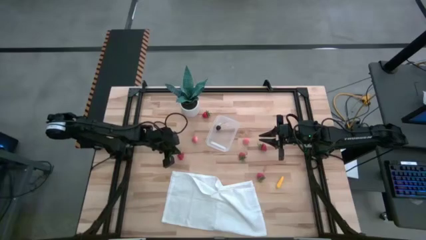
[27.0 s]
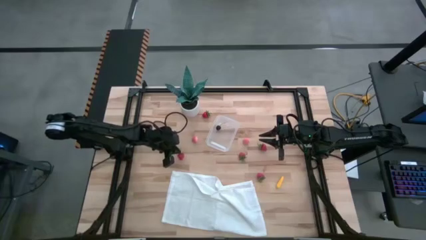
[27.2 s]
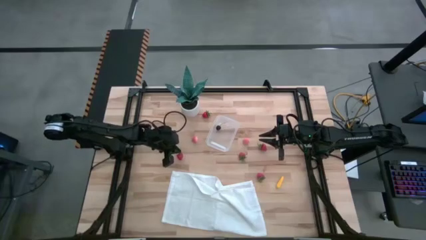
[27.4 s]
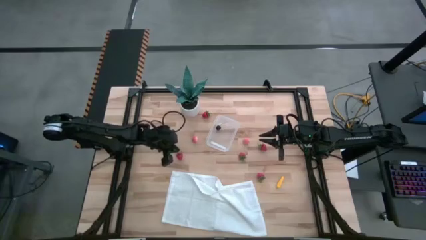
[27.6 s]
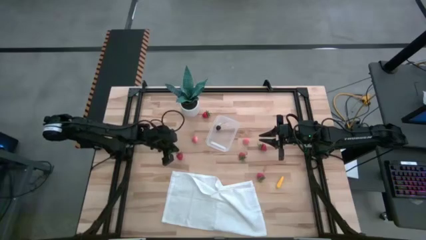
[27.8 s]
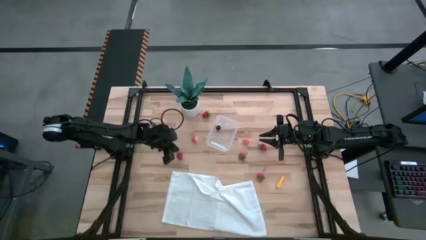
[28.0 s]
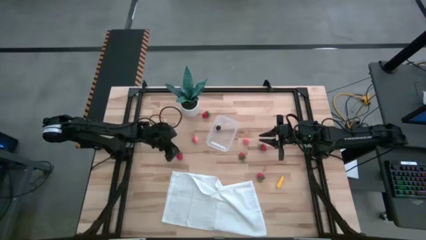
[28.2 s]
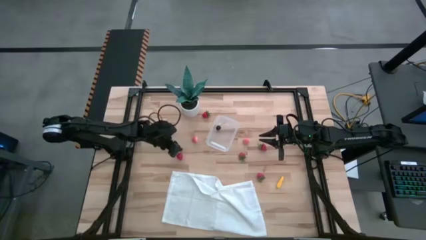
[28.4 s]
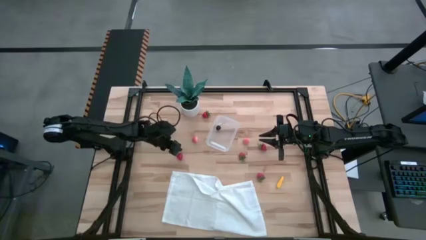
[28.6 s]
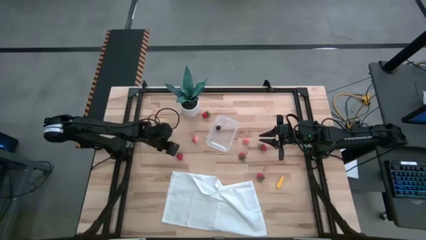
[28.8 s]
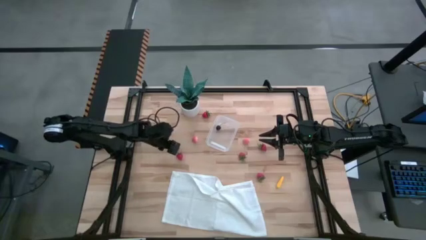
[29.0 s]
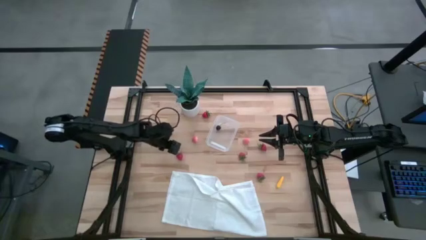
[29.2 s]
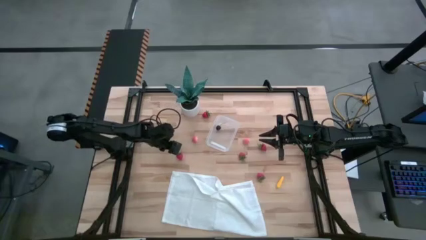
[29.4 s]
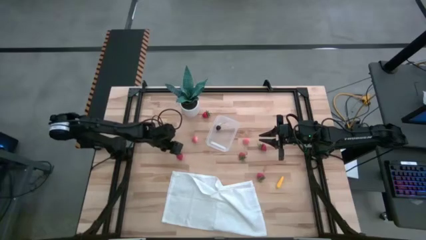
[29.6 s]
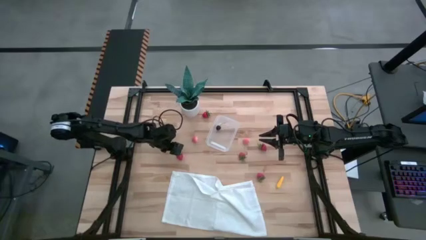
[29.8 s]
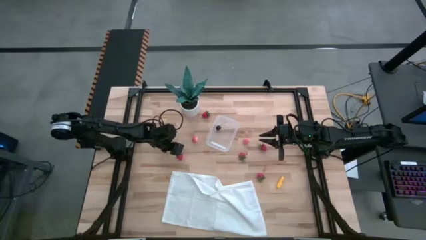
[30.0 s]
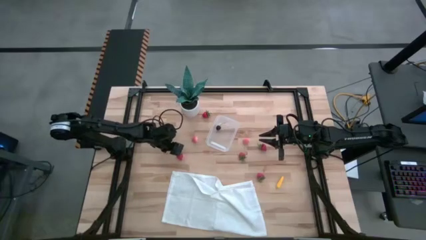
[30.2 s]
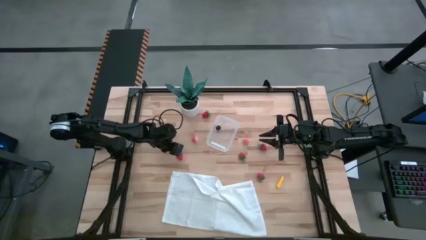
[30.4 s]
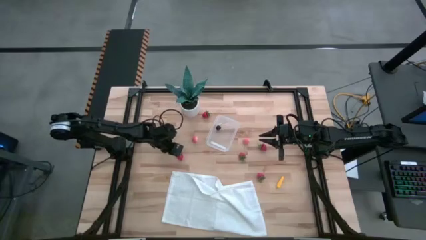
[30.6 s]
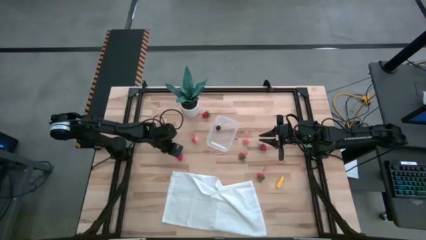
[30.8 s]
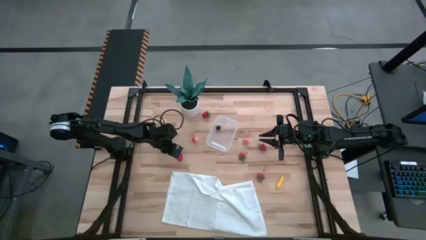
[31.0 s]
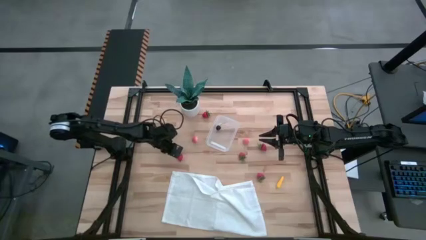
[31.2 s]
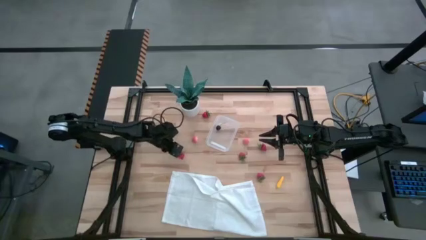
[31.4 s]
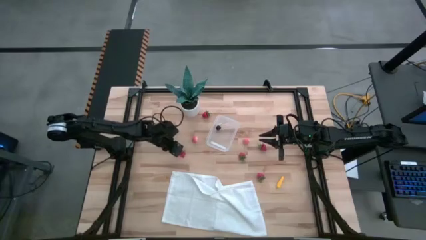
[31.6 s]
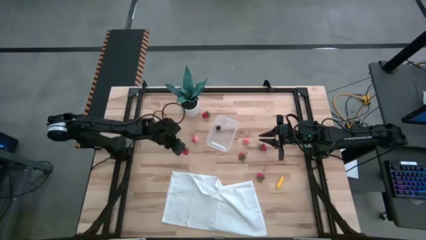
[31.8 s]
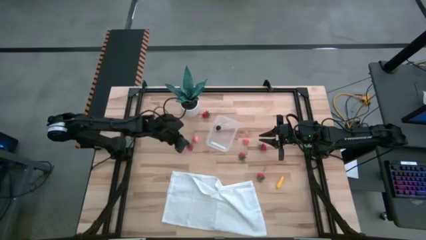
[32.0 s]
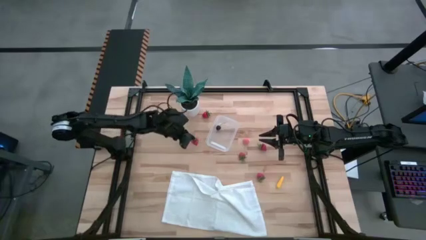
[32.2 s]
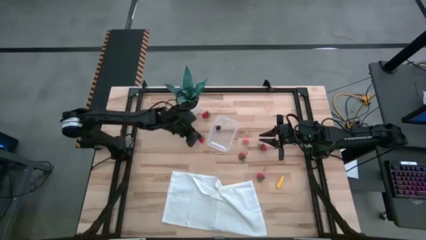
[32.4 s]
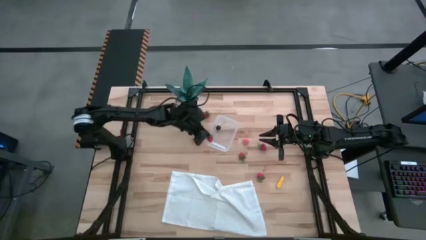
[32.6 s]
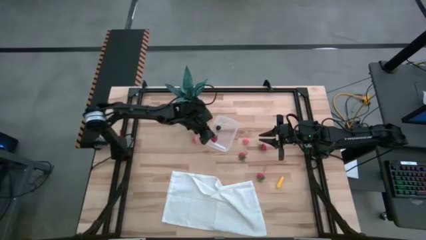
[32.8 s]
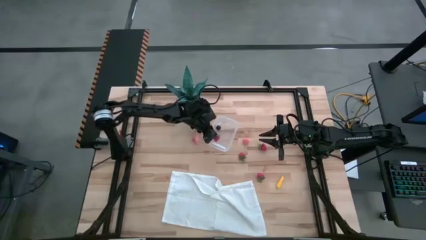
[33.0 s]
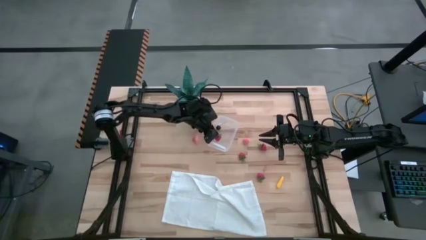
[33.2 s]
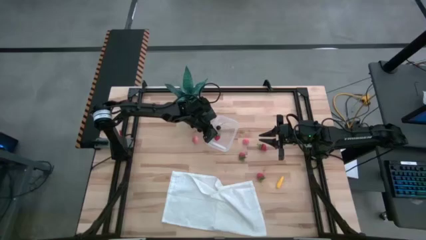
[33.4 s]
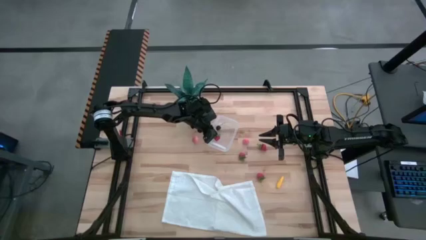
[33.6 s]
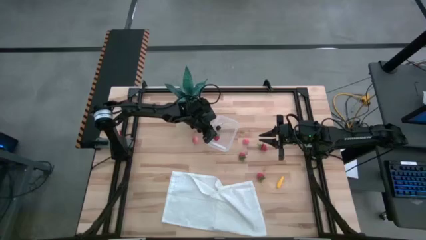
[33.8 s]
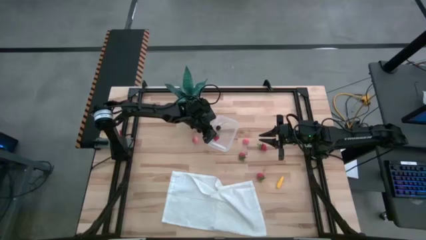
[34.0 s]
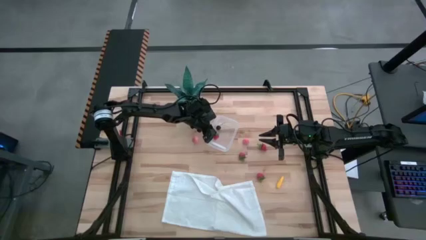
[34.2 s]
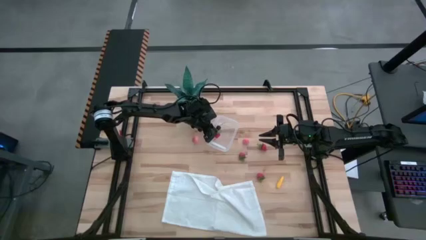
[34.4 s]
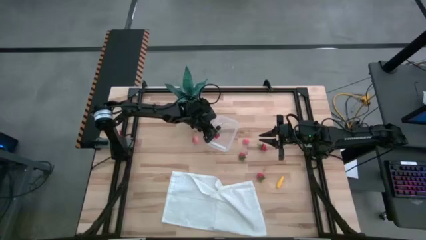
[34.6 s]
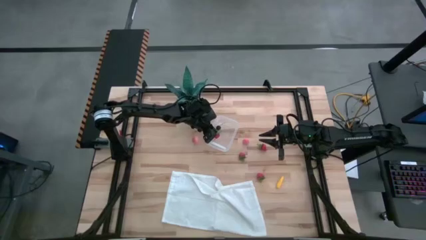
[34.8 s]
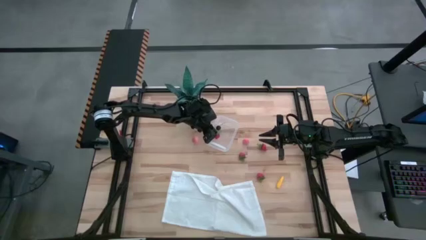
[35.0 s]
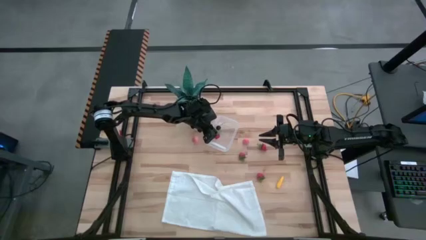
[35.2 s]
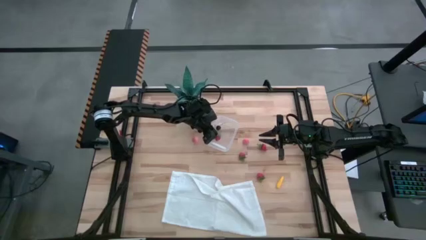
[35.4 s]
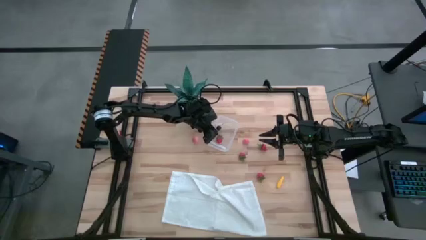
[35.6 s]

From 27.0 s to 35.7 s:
Task: Pick and placing Produce into tupperware
Put the red strawberry into the transparent bin

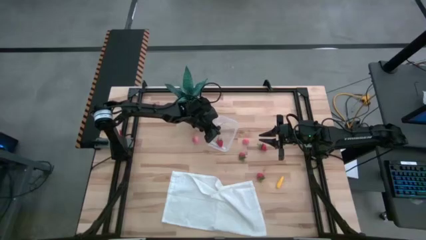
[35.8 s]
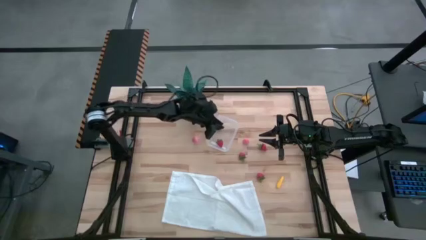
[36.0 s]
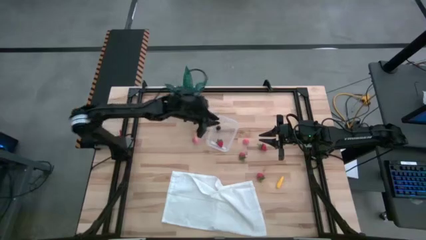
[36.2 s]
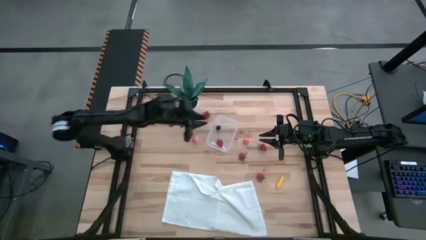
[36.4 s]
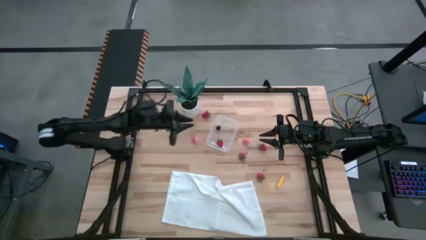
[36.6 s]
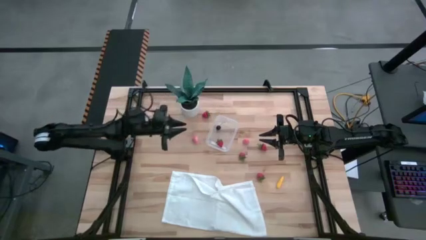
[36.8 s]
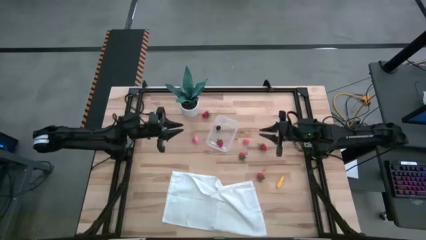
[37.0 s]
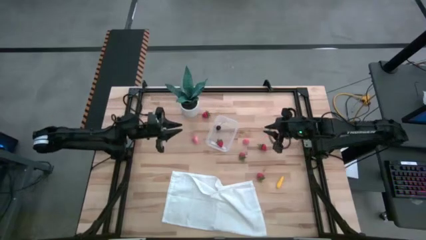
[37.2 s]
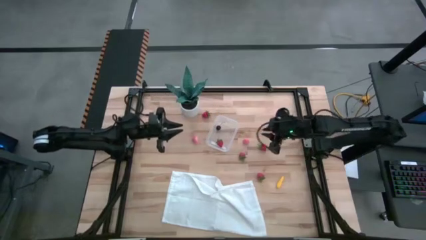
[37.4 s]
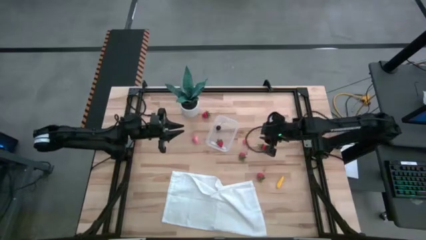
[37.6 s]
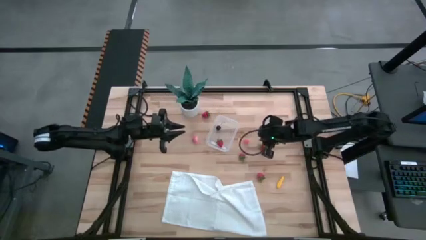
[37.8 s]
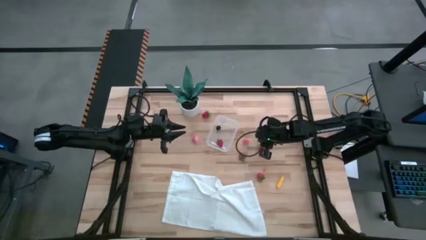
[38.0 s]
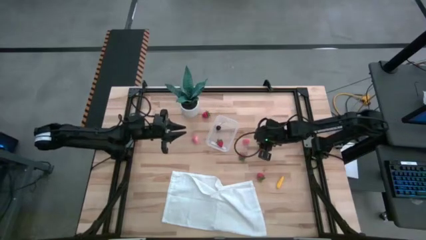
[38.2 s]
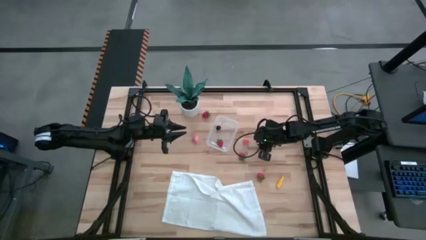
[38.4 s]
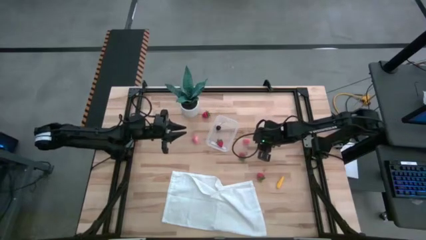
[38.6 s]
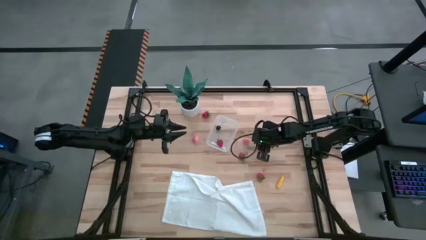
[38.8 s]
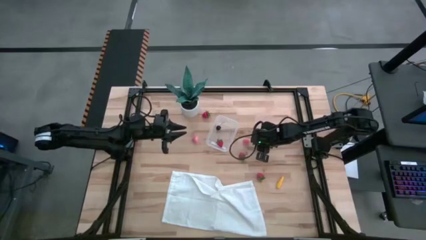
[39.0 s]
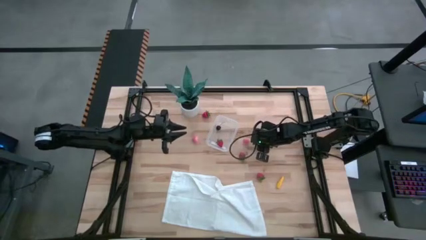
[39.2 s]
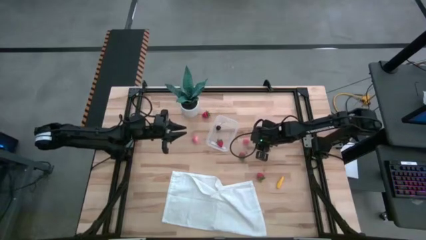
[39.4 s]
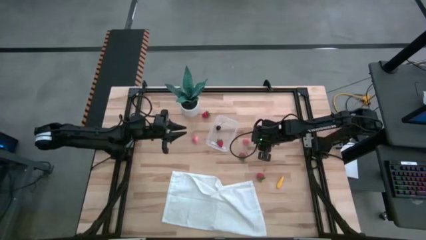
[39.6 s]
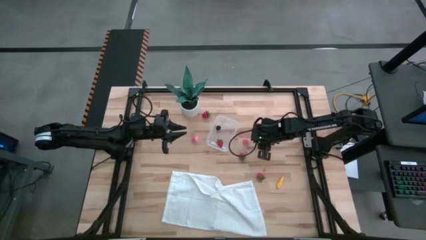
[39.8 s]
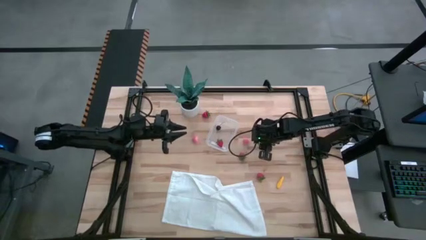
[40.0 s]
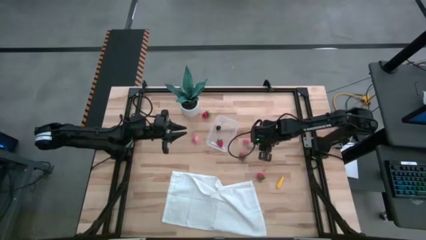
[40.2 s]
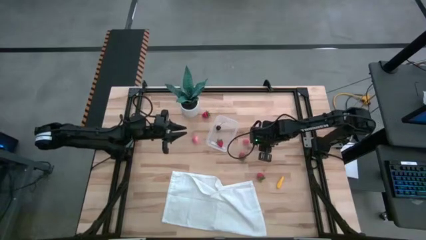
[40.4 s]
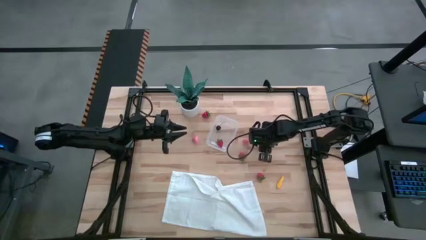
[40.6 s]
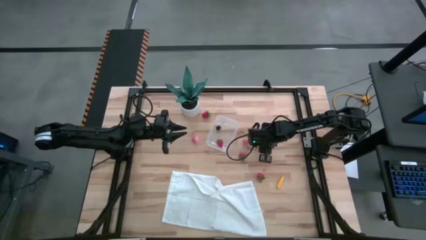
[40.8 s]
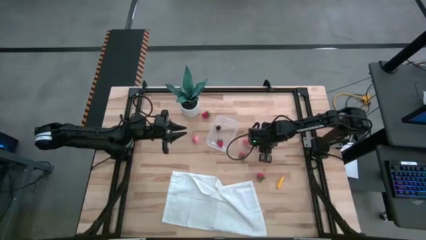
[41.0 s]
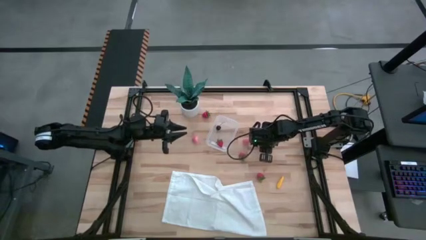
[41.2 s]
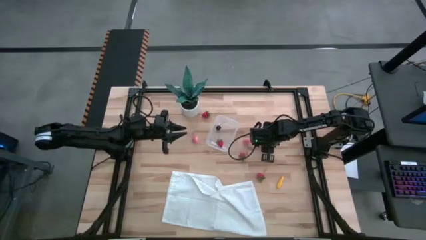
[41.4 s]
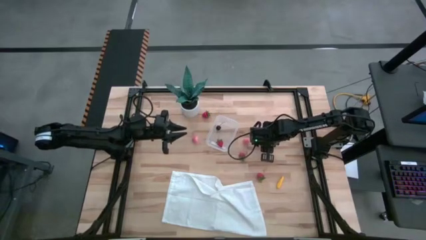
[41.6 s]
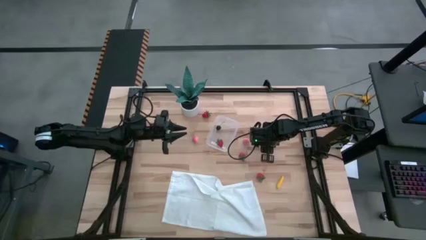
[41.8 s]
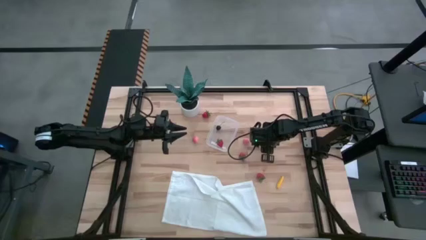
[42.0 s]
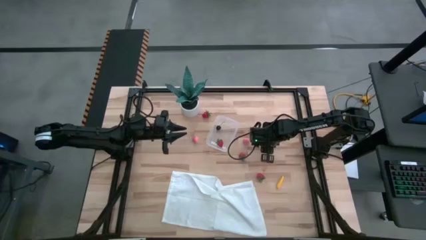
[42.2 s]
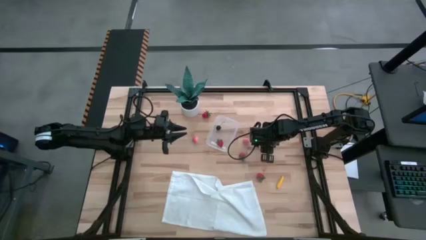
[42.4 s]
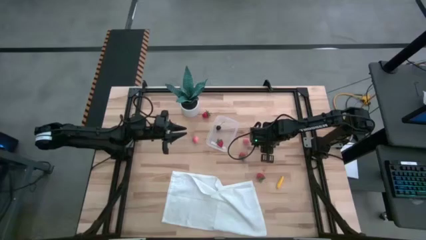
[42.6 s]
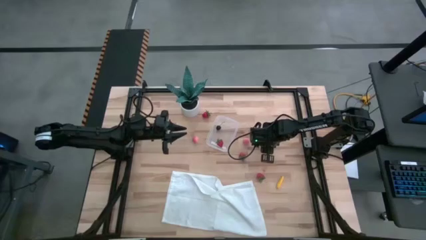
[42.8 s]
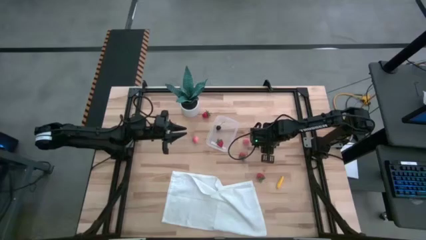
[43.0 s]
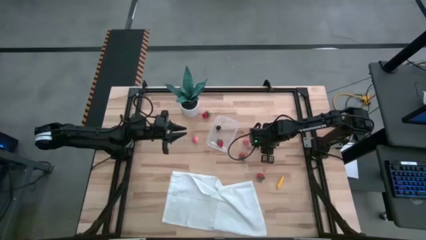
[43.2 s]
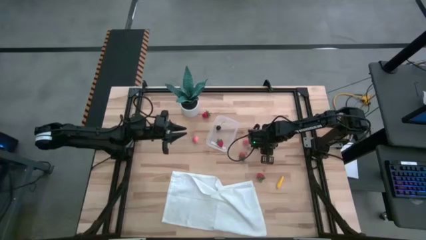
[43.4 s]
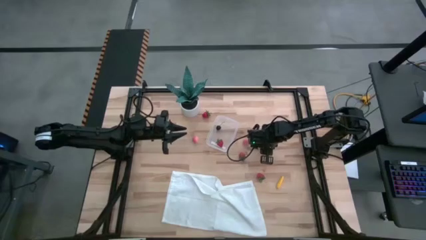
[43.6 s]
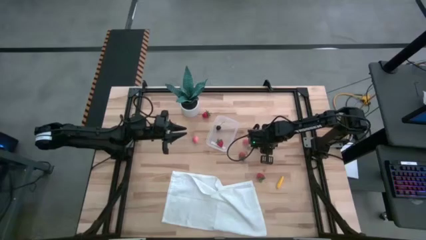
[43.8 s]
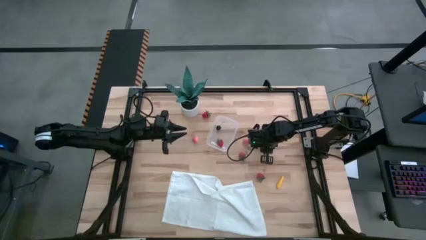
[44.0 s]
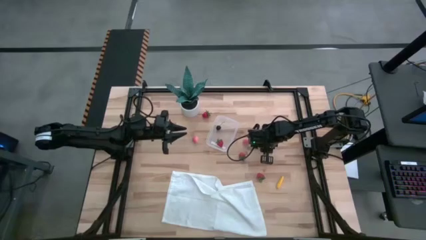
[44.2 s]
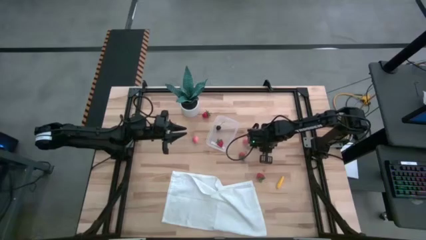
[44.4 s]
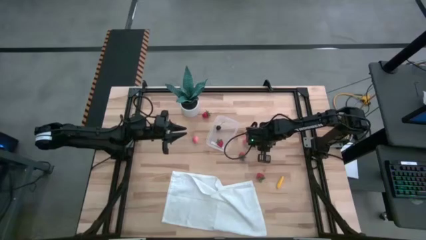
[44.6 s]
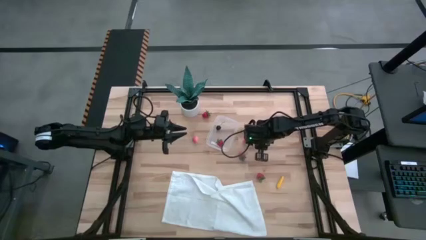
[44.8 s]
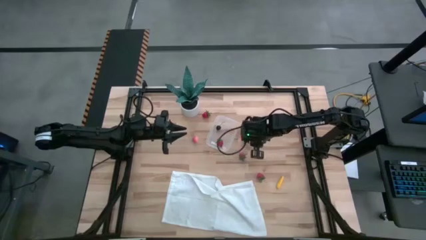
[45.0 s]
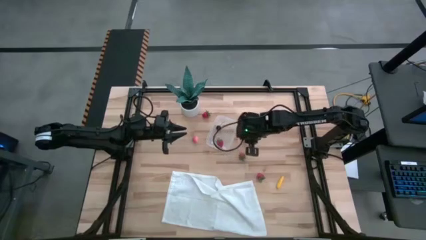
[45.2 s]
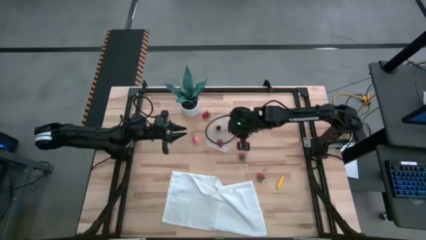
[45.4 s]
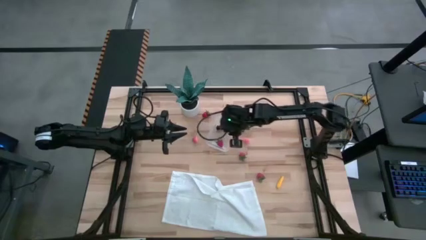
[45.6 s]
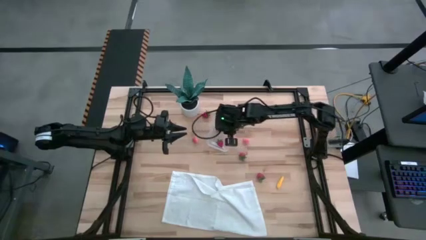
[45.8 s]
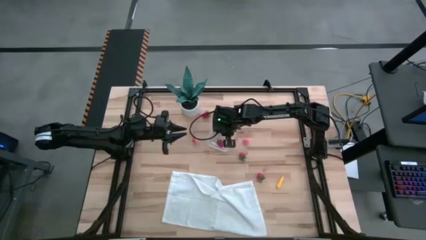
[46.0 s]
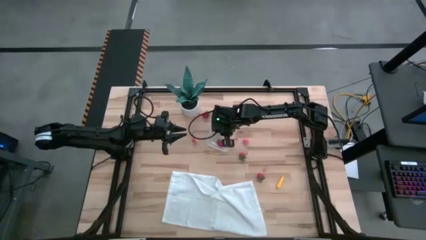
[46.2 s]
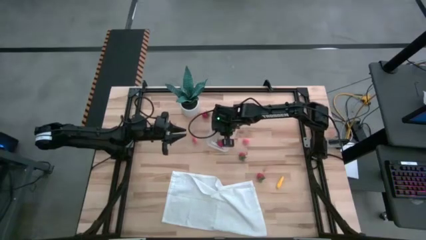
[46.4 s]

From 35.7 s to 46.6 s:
Put the red strawberry into the transparent bin
